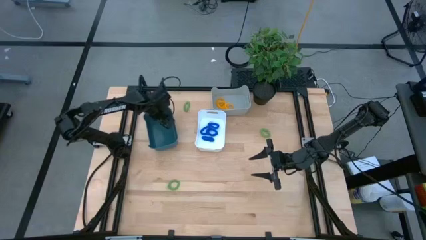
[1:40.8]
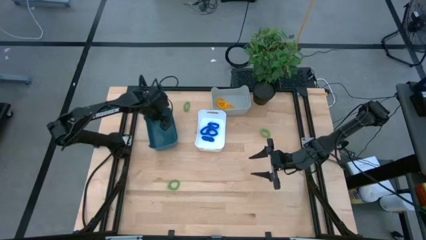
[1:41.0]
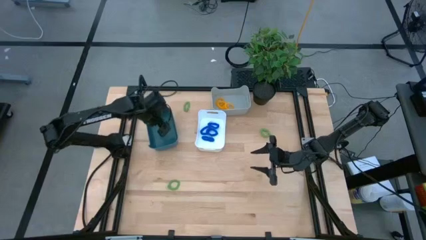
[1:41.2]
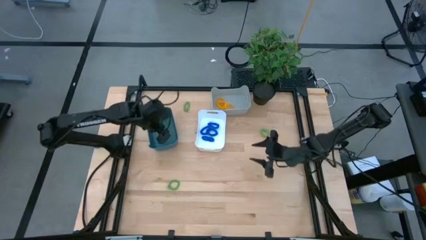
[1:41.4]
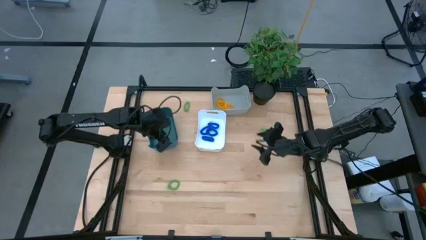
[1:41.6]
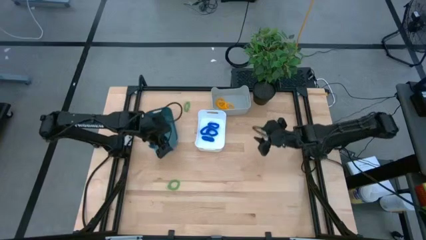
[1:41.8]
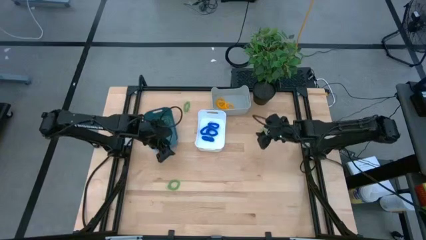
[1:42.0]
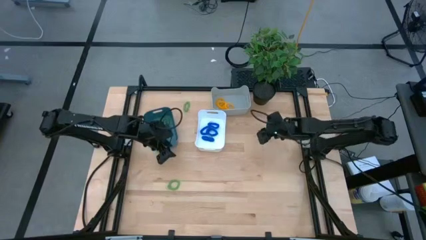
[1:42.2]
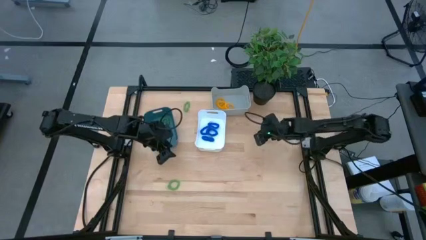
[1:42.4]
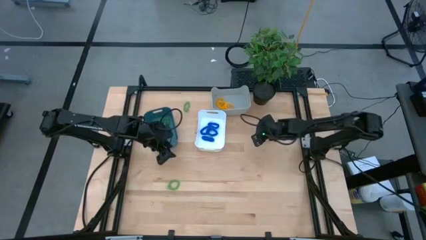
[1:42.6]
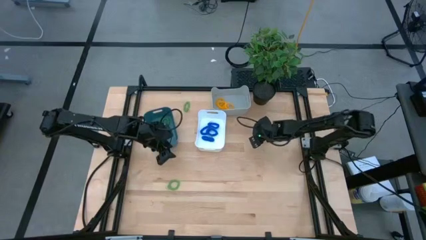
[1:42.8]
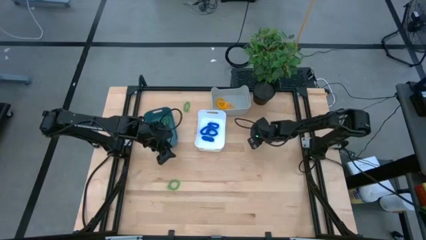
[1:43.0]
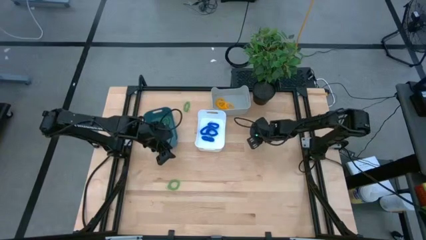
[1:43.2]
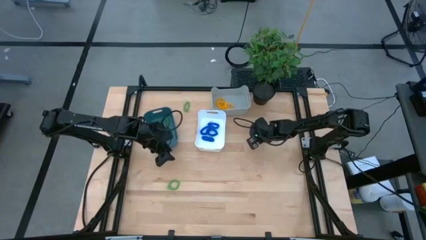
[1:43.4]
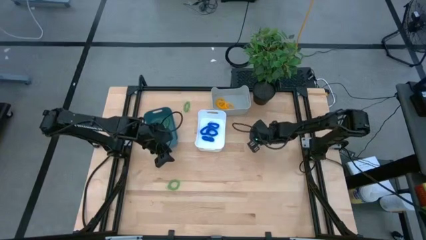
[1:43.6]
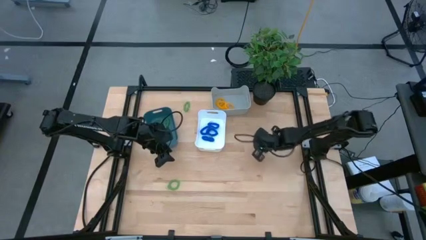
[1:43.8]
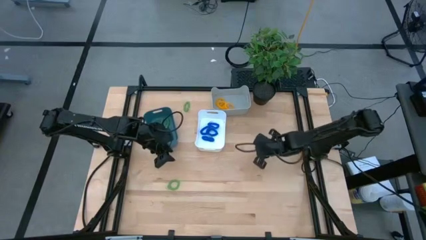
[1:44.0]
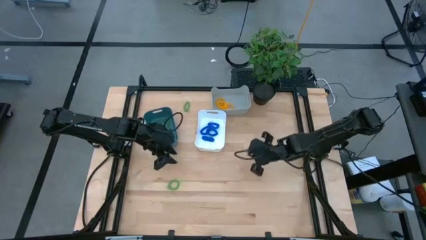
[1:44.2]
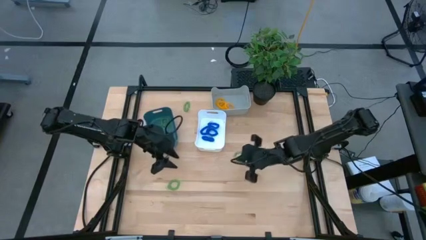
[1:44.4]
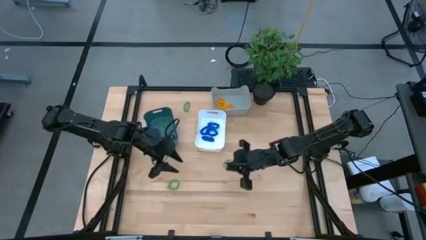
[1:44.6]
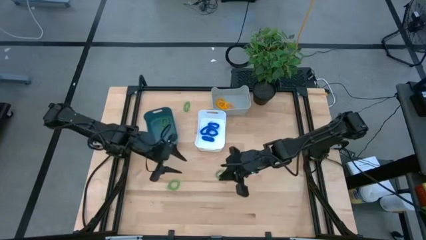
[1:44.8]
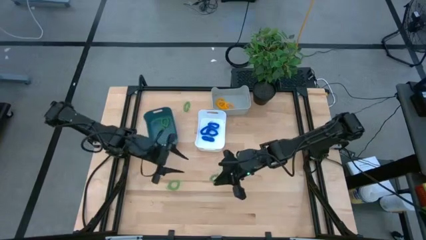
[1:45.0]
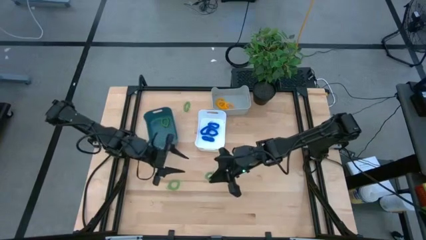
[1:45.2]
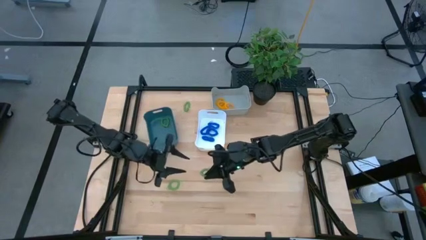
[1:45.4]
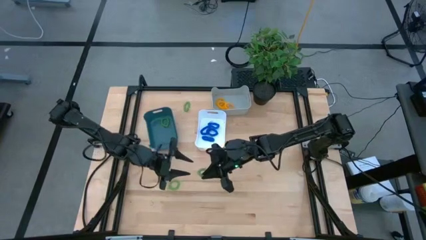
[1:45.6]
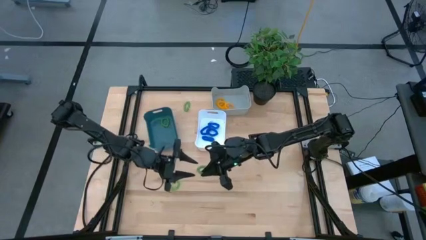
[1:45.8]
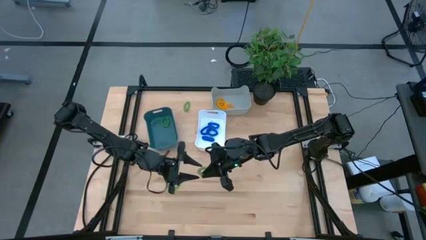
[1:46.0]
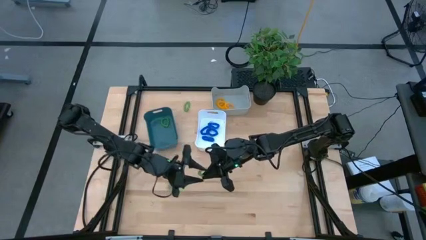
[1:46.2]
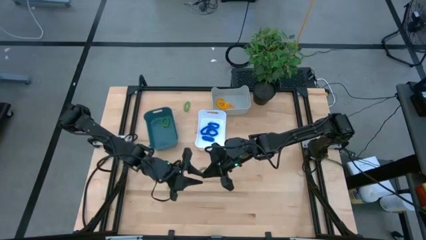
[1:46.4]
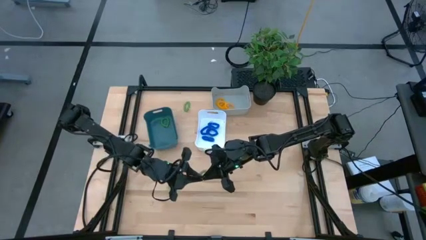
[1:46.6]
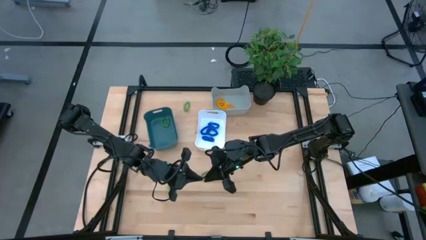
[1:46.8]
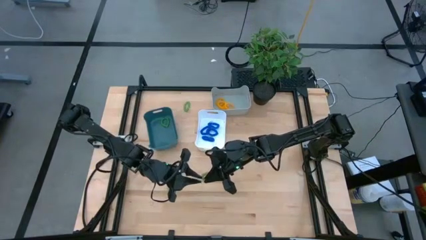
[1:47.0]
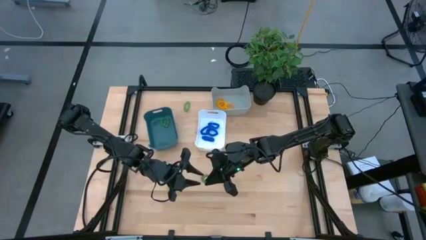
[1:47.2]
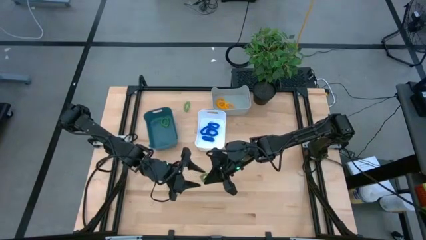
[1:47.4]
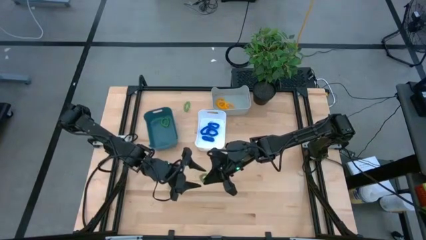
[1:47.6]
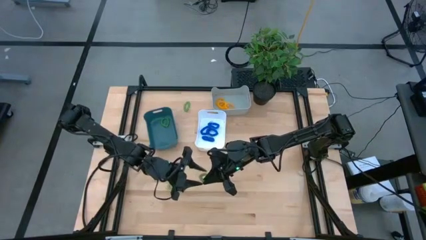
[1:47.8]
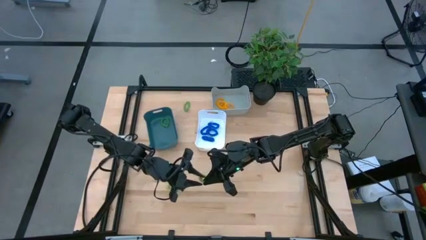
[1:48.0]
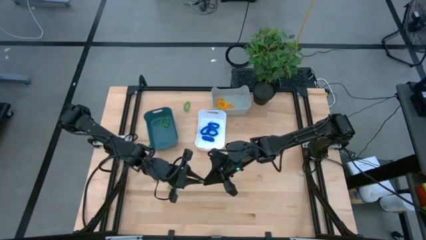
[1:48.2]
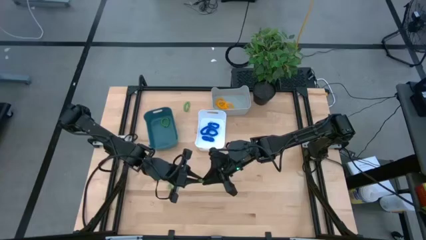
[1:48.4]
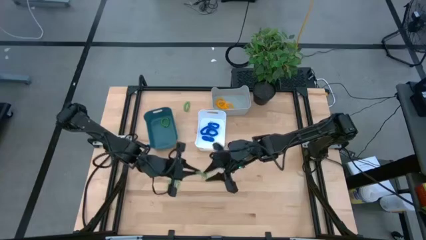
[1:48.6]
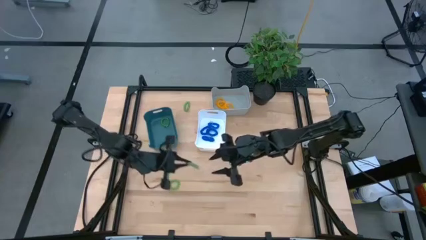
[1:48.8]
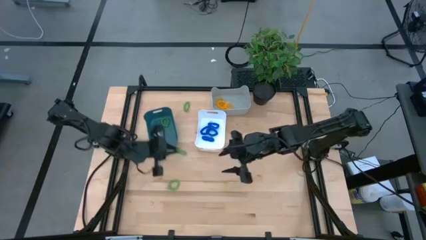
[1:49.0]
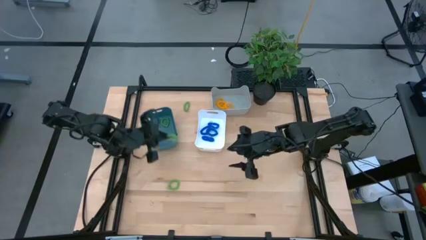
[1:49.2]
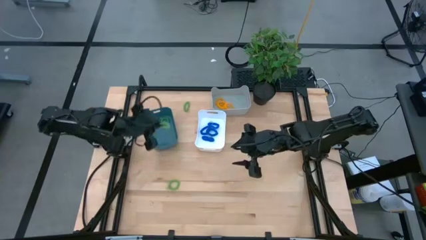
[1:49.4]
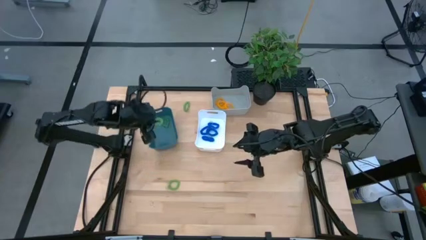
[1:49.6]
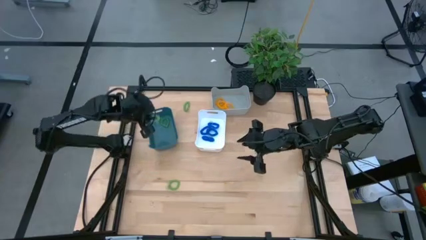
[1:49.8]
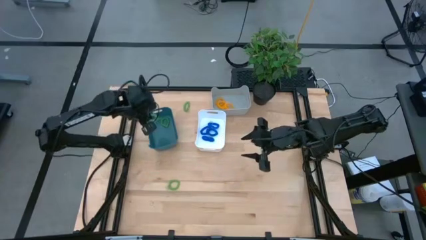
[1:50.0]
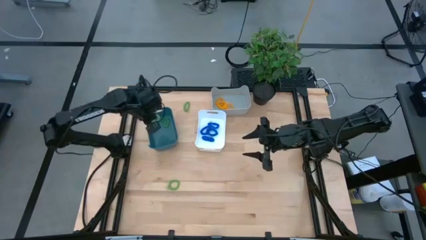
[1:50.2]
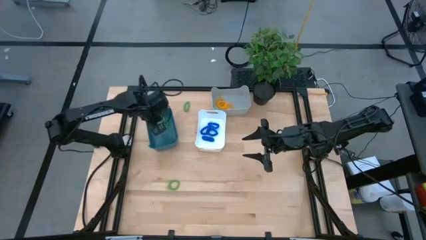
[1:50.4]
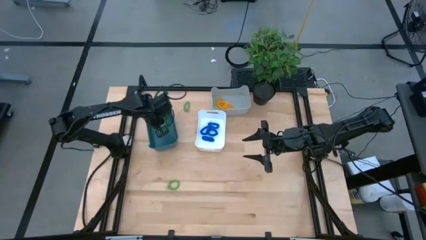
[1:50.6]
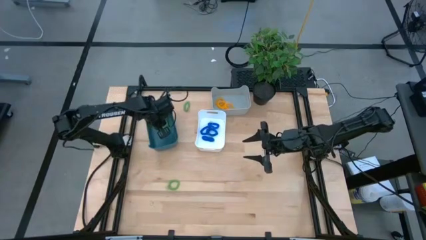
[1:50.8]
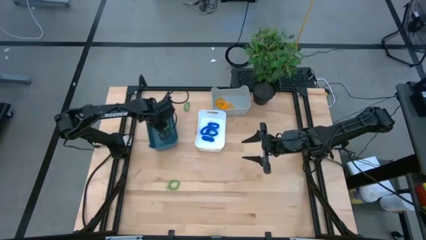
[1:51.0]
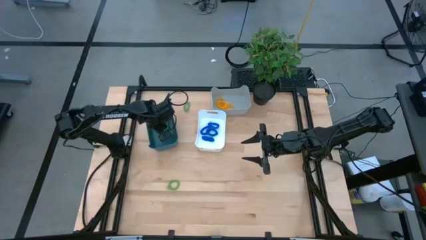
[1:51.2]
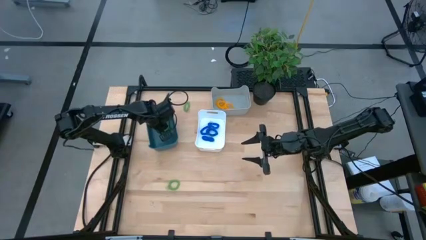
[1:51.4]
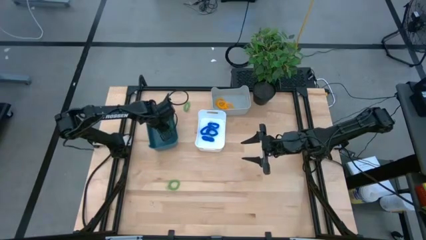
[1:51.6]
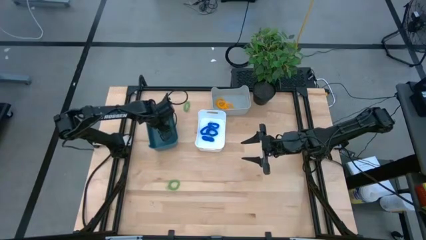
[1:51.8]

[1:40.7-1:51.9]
Task: Sort spring keychains
Put the green spring keychain into the blue bin

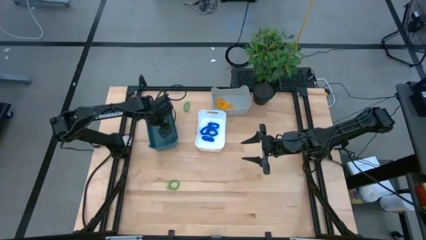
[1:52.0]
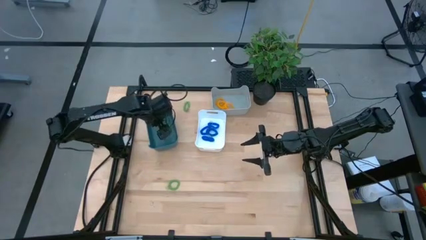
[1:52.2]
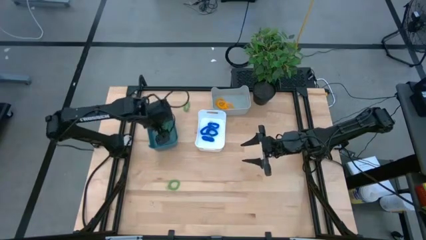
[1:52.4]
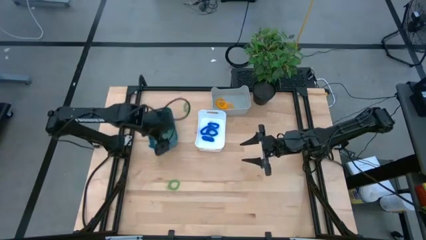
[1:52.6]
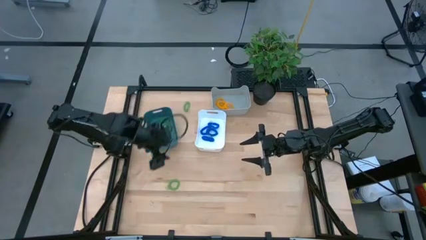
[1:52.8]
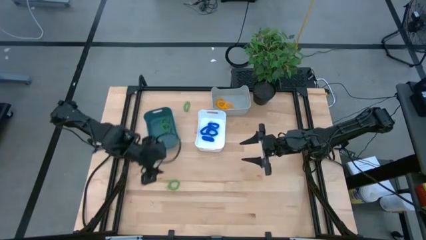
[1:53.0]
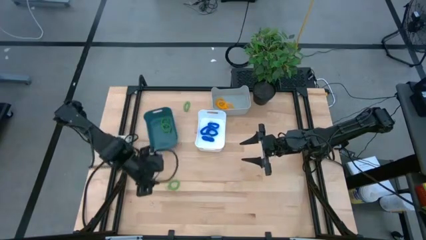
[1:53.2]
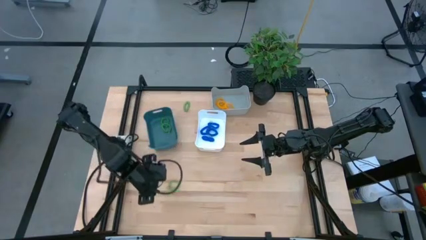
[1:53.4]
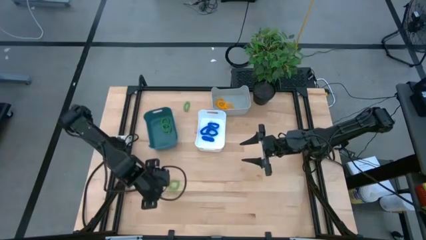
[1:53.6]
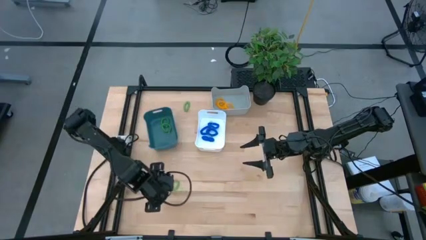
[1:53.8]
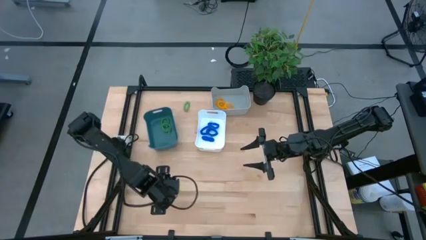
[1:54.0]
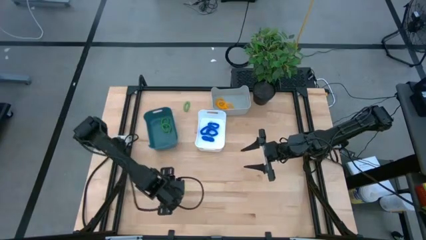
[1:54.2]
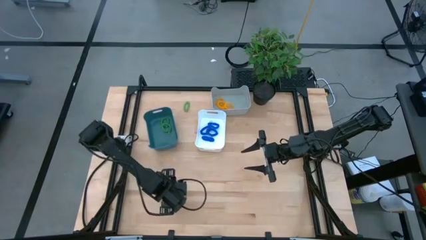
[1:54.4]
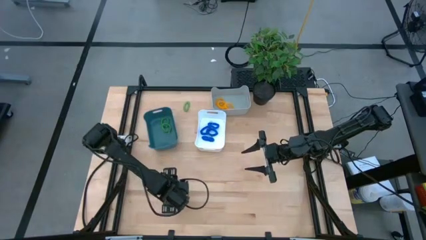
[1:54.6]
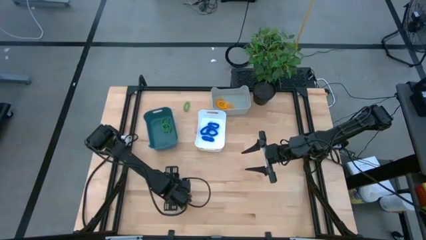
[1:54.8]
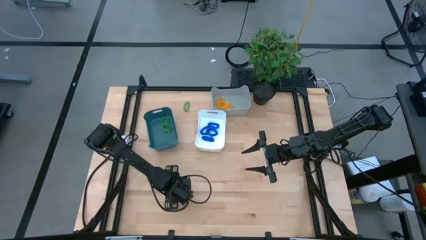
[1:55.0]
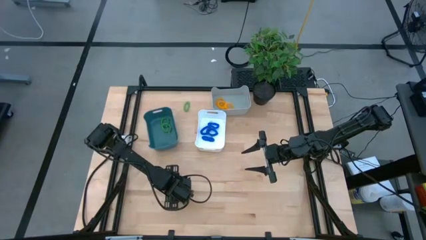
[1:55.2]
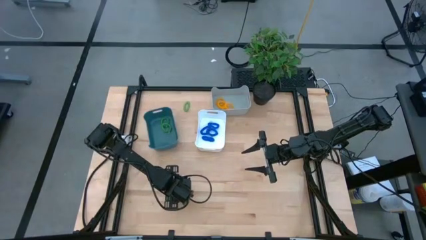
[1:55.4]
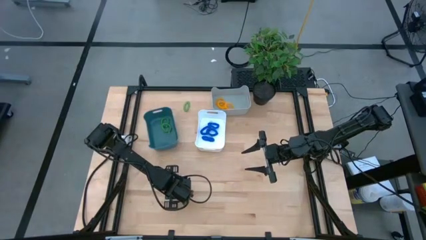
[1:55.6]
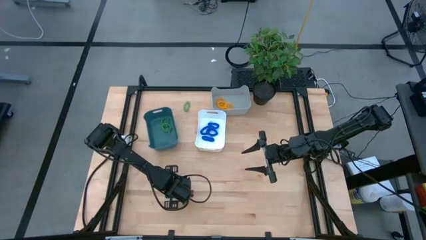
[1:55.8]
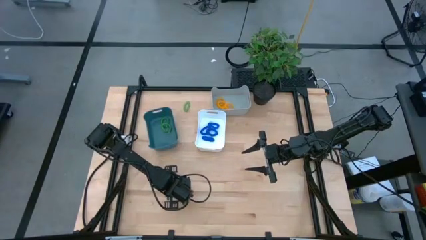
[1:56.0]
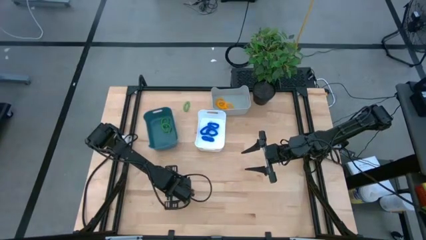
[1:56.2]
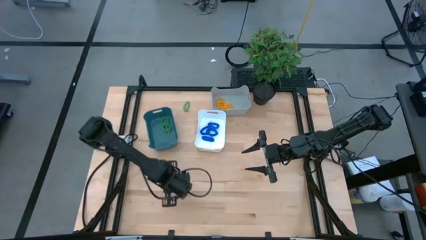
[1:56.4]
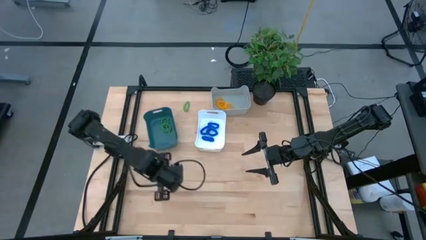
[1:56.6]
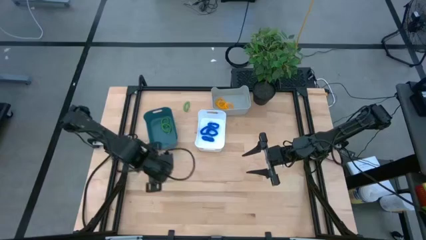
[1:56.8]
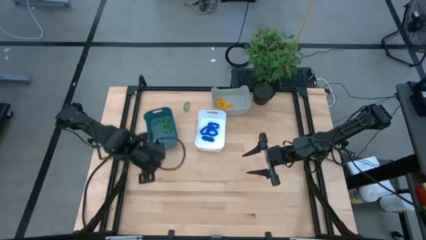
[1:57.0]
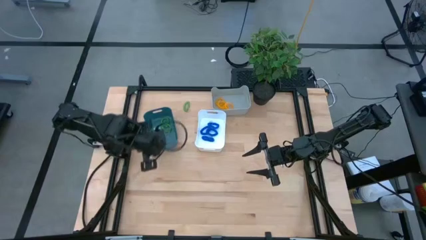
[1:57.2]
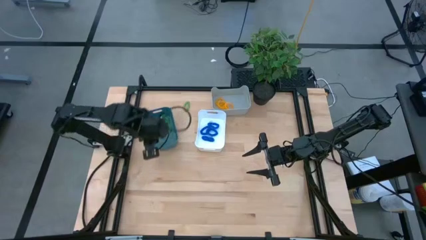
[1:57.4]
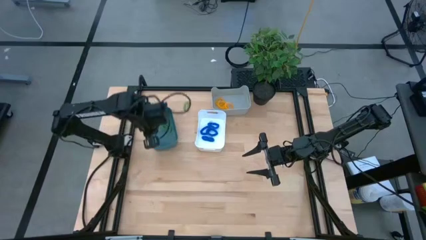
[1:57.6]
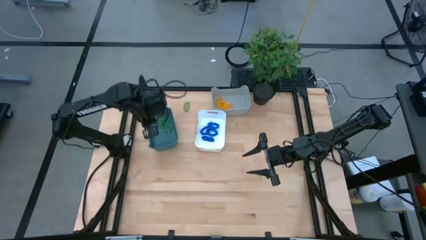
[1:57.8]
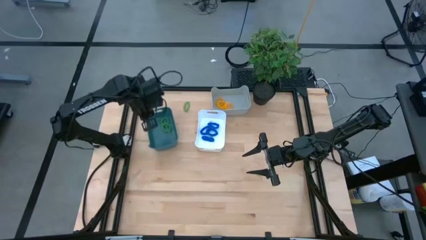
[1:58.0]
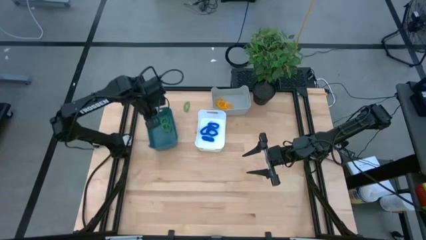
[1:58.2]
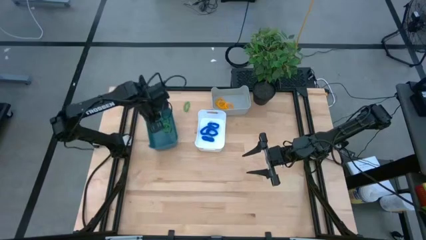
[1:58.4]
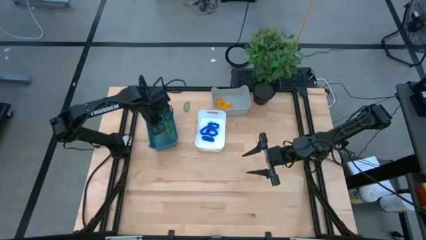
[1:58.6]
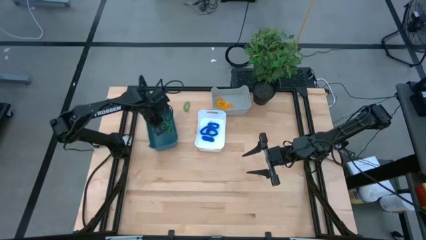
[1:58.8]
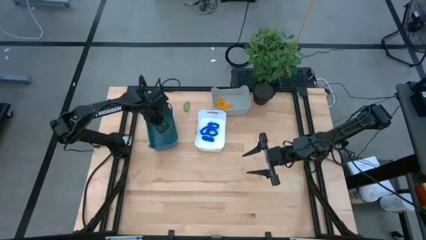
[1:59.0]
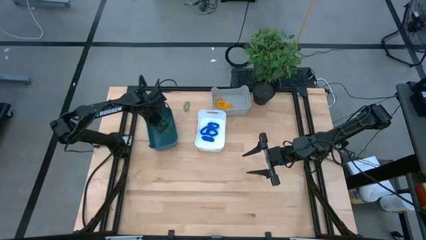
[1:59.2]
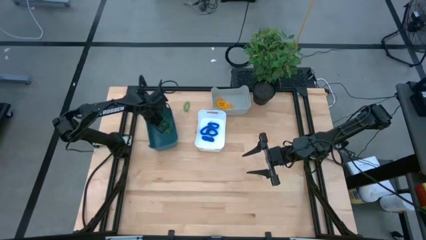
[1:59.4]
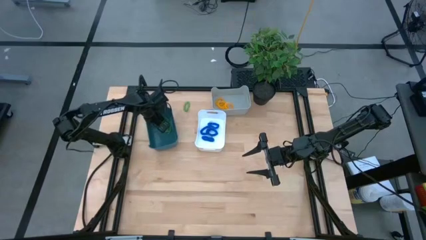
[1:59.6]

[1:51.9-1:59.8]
Put the green spring keychain into the blue bin
